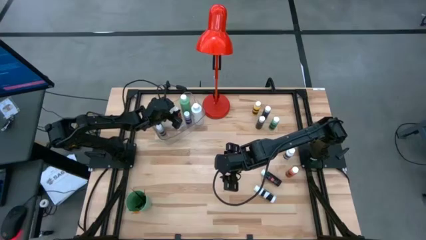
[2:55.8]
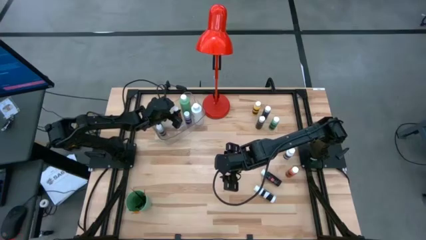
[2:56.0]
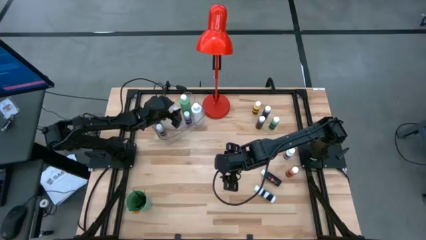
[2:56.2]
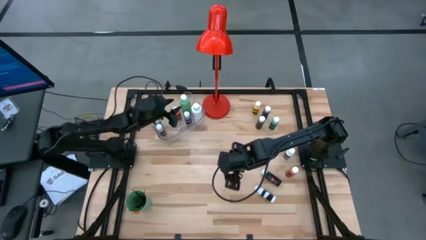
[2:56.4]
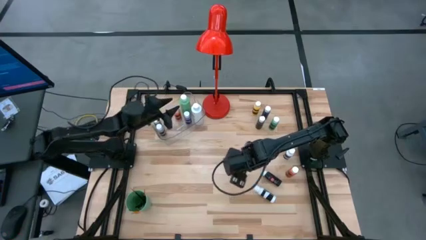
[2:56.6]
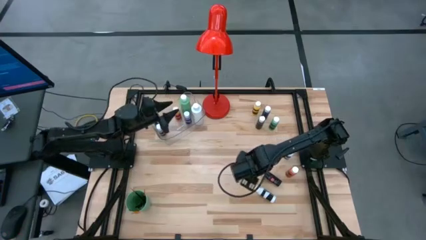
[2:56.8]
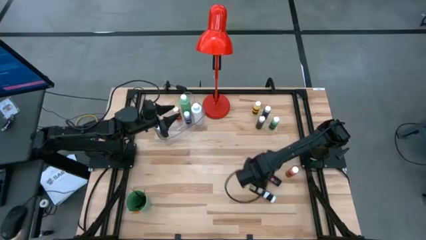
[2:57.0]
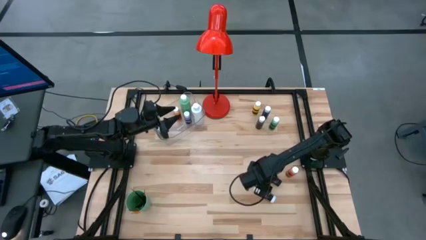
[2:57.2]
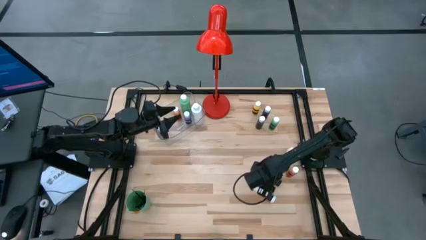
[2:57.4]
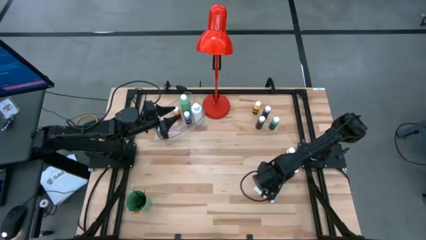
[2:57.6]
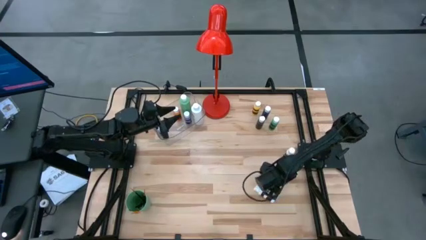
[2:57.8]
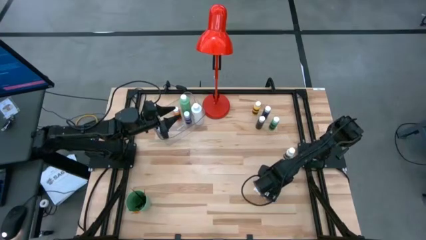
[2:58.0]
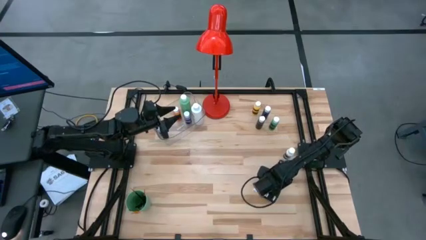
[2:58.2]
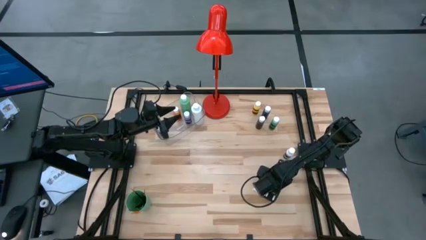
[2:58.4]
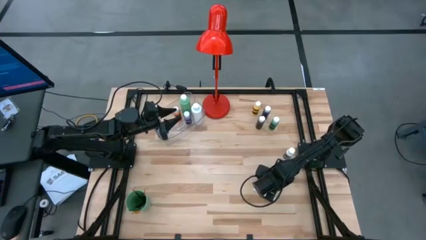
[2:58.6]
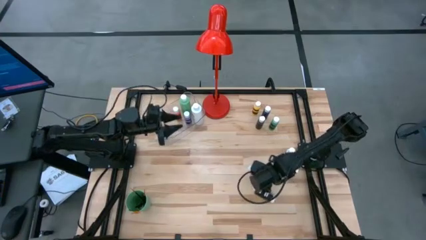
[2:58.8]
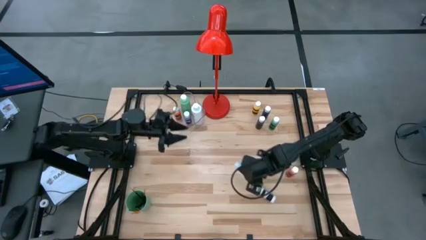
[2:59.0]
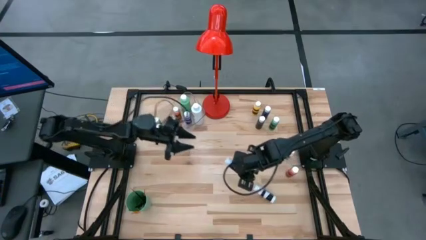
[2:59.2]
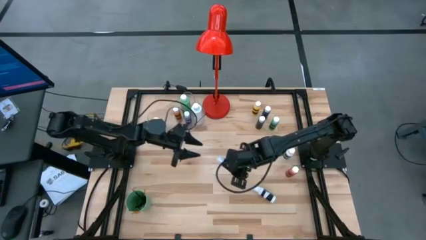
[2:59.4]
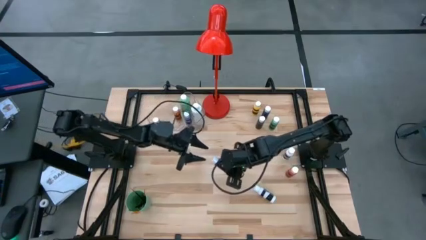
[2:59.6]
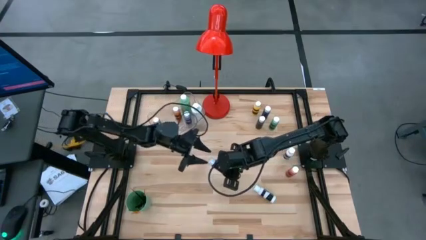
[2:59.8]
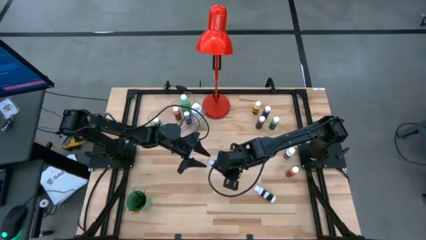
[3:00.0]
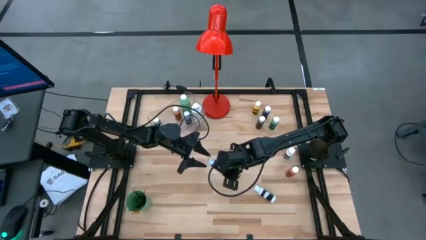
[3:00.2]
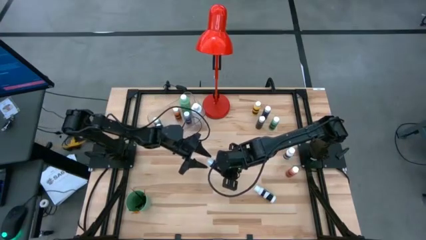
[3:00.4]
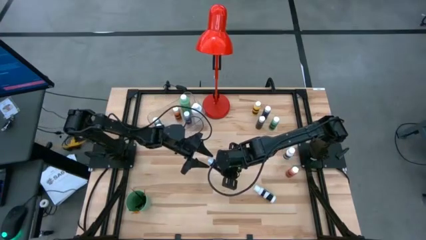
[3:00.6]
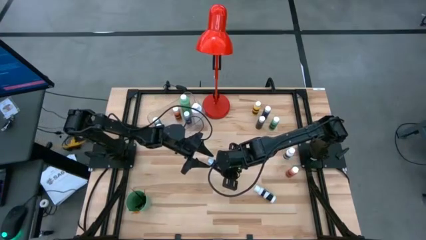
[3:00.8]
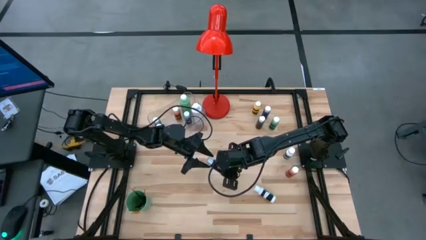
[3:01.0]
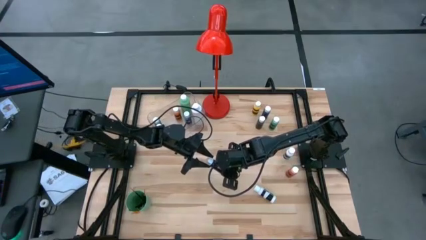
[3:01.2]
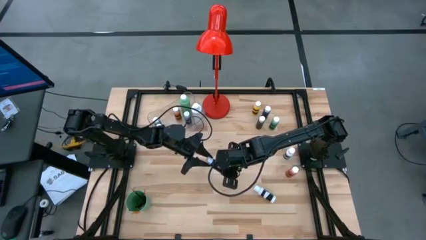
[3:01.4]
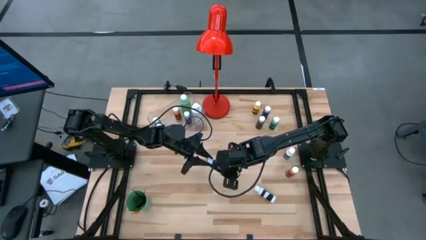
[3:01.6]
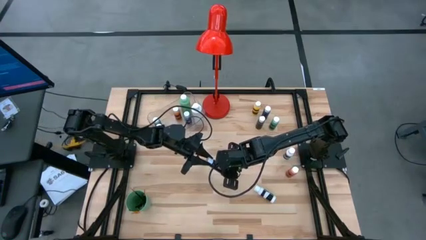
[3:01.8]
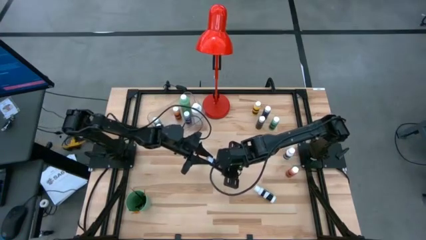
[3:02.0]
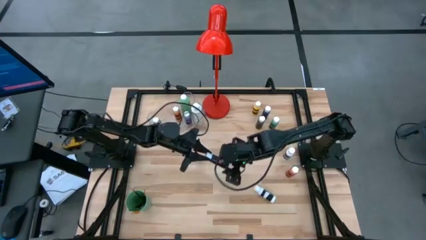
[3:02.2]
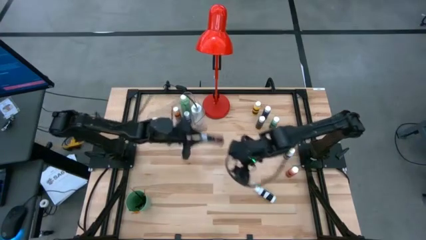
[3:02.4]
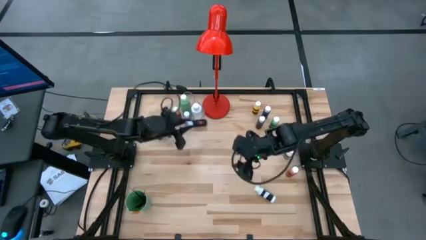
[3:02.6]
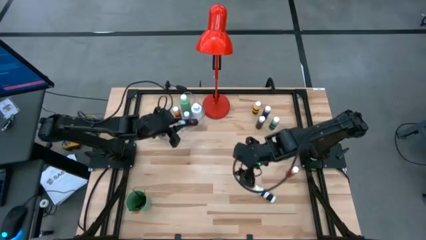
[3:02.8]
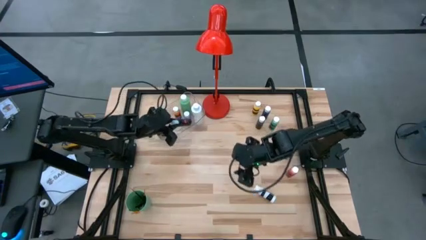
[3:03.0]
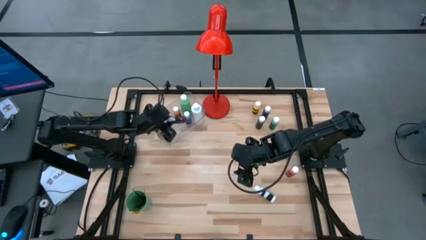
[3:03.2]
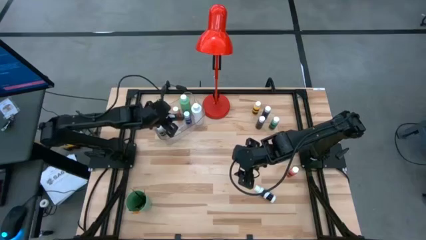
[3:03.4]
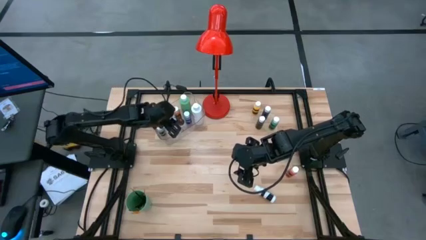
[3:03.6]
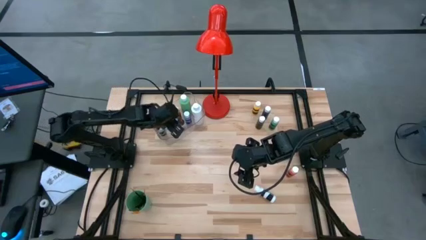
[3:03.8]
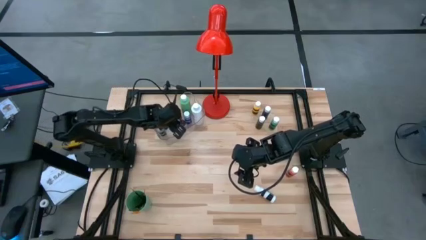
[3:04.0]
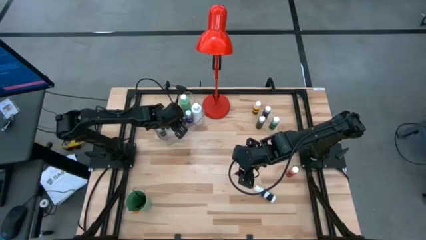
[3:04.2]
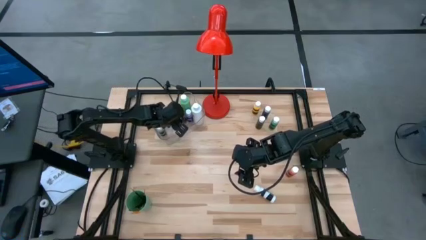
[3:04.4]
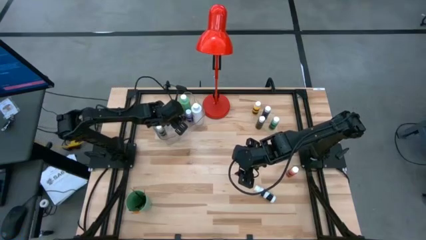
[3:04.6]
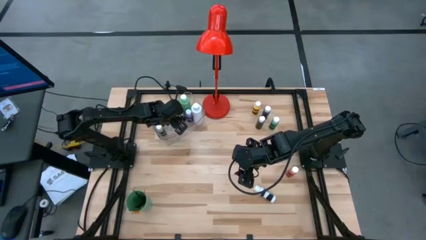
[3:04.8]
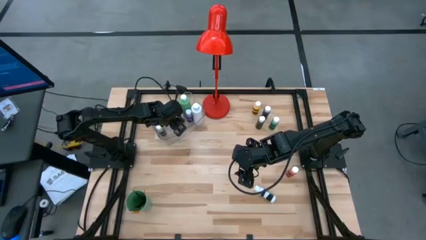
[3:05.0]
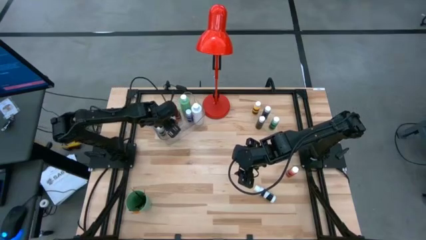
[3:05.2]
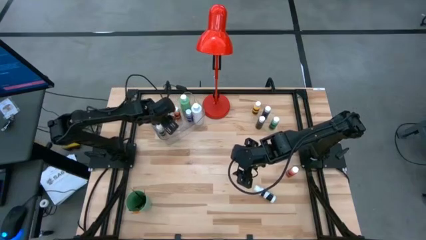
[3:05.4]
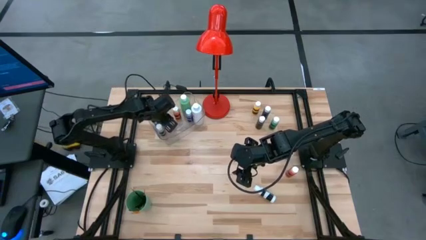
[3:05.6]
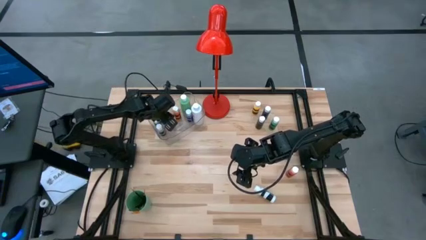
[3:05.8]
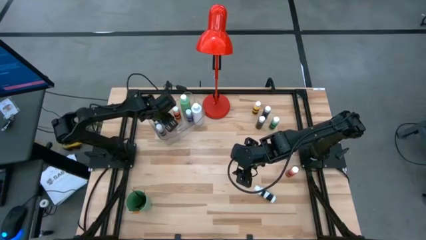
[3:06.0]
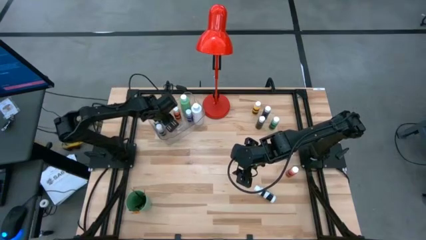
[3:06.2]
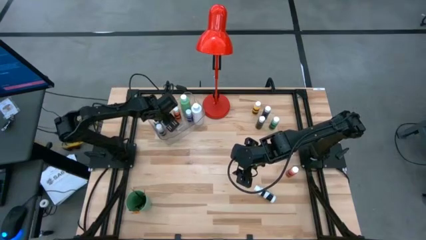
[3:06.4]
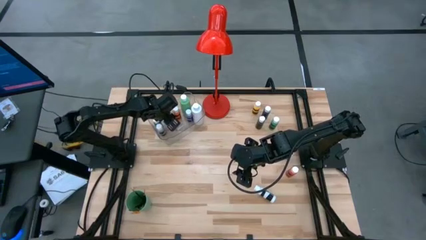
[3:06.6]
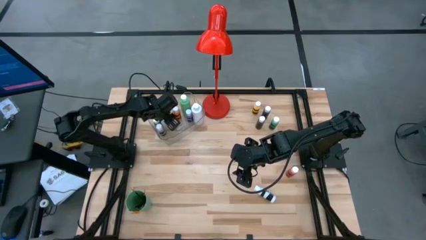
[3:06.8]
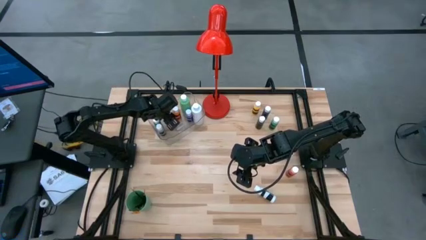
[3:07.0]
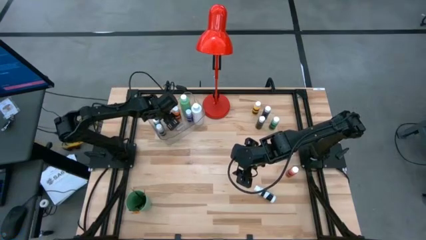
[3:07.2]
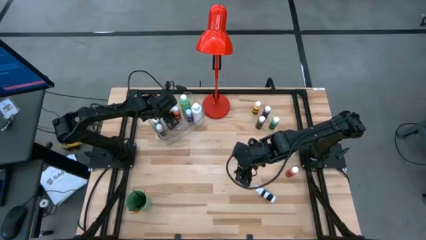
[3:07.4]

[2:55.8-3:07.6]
Task: Pick & Place Paint Supplies
Put the black paint bottle into the transparent bin
